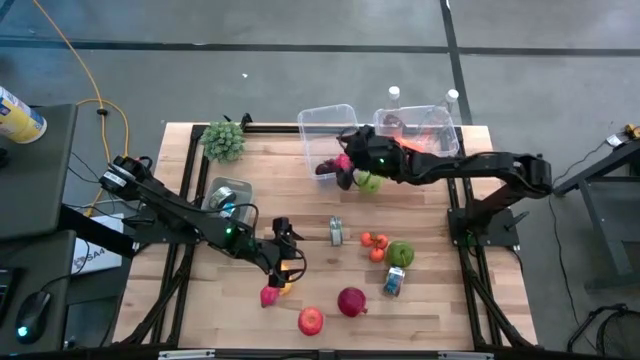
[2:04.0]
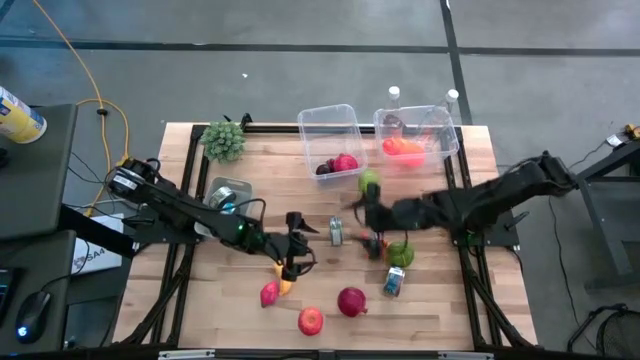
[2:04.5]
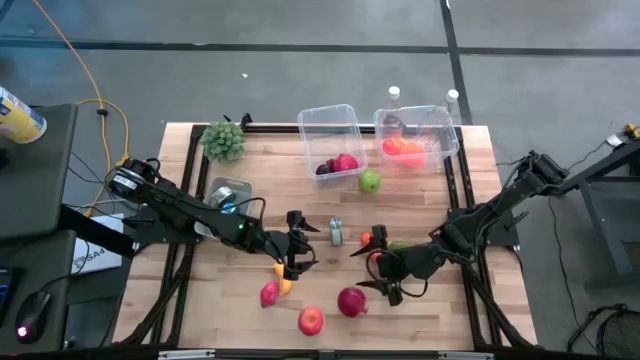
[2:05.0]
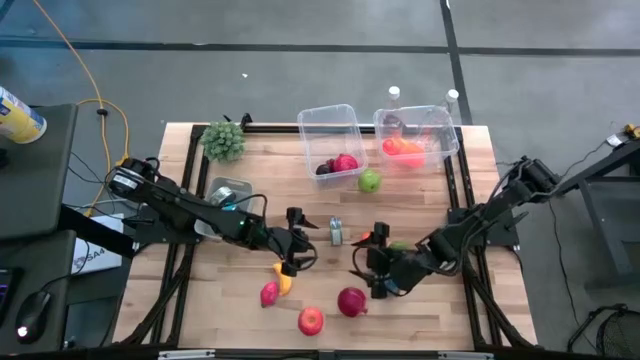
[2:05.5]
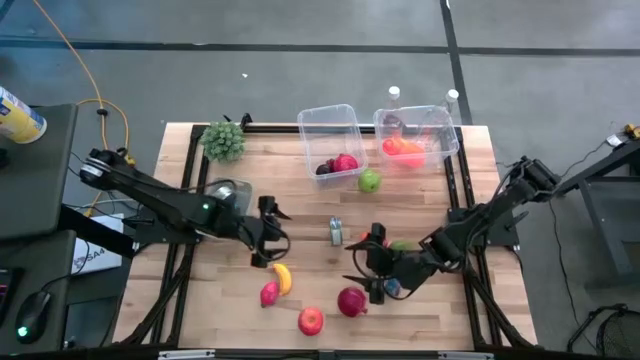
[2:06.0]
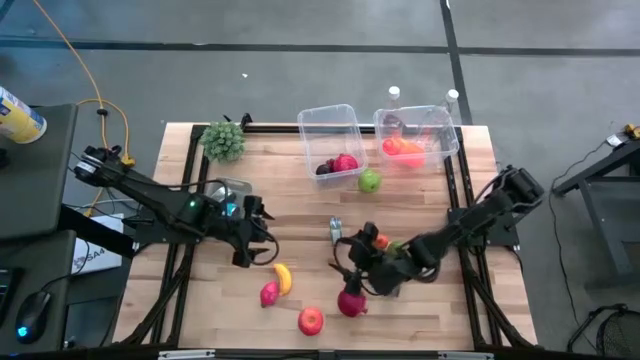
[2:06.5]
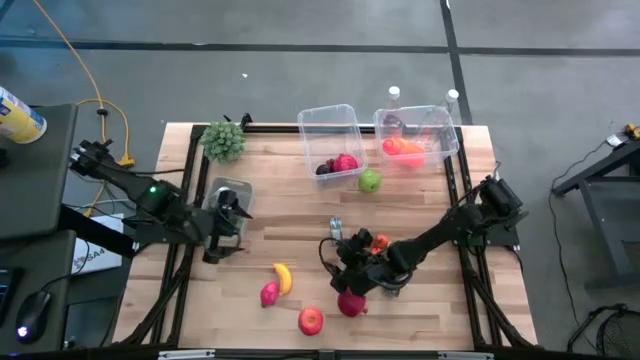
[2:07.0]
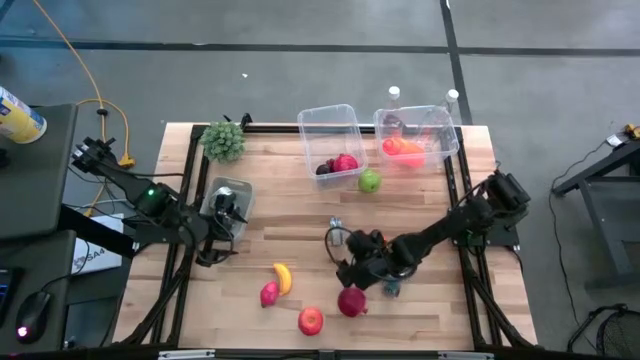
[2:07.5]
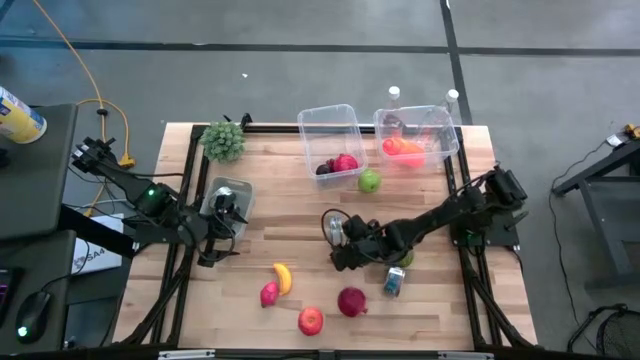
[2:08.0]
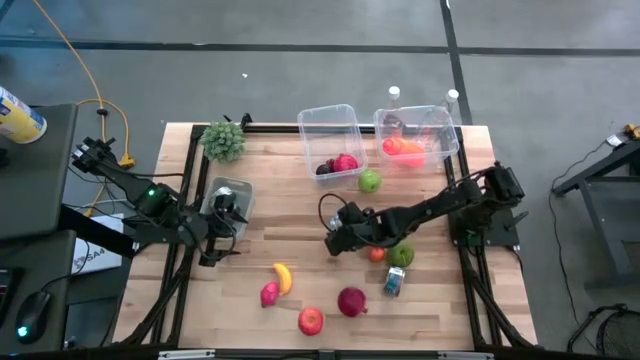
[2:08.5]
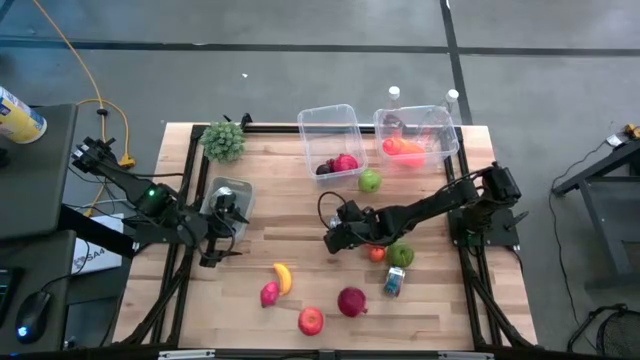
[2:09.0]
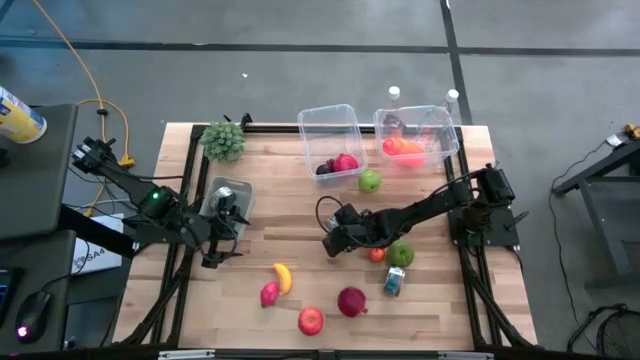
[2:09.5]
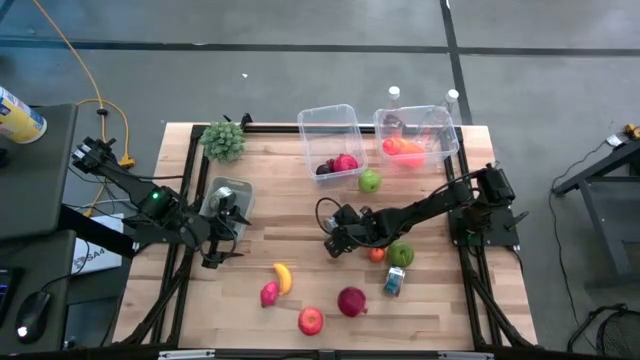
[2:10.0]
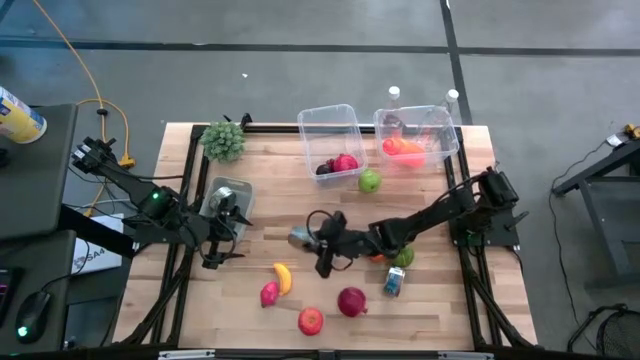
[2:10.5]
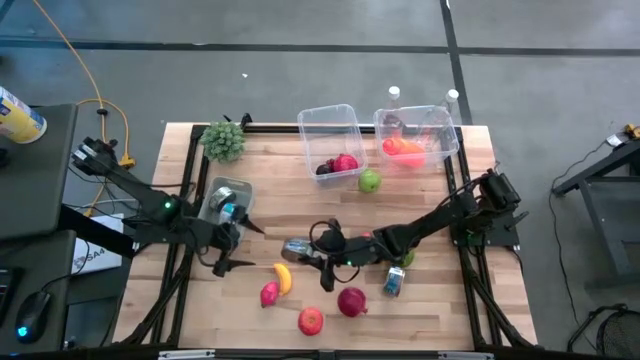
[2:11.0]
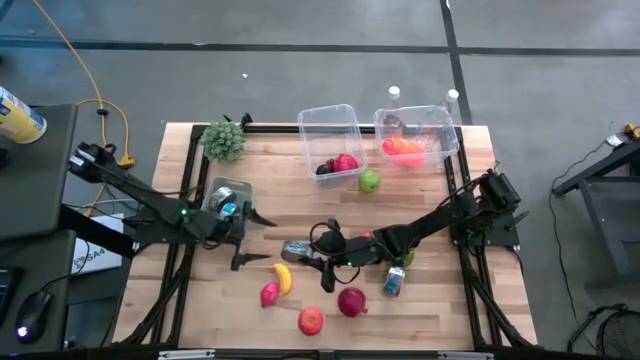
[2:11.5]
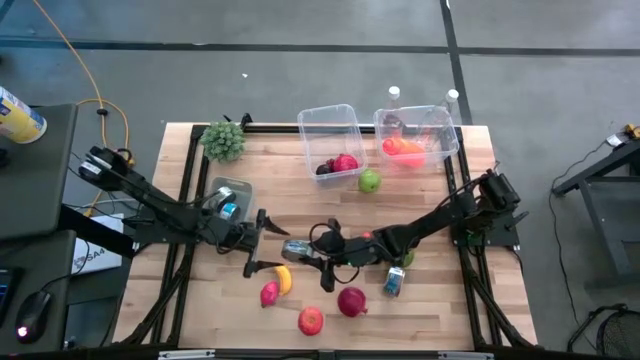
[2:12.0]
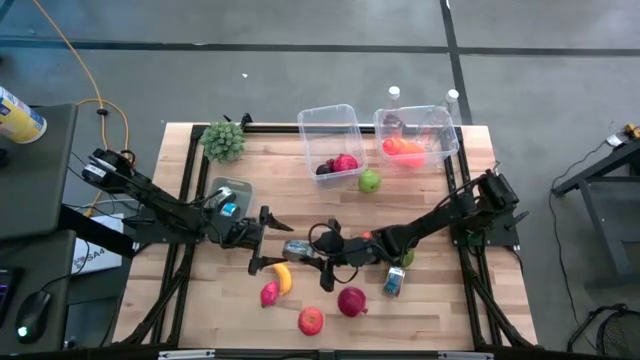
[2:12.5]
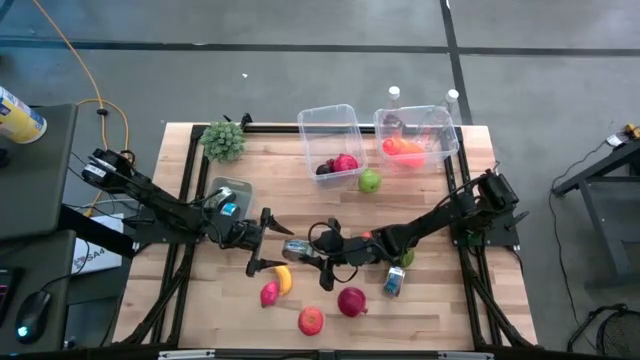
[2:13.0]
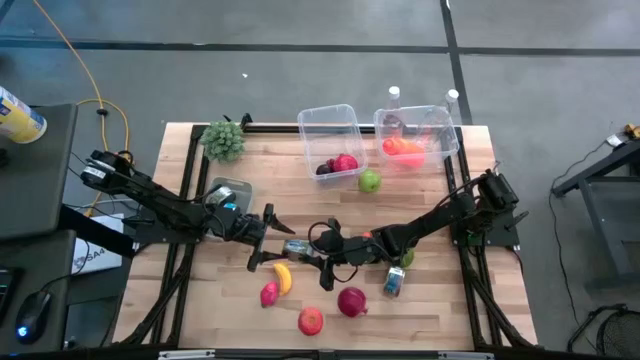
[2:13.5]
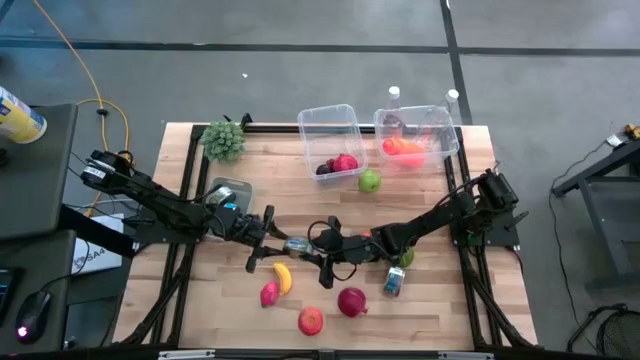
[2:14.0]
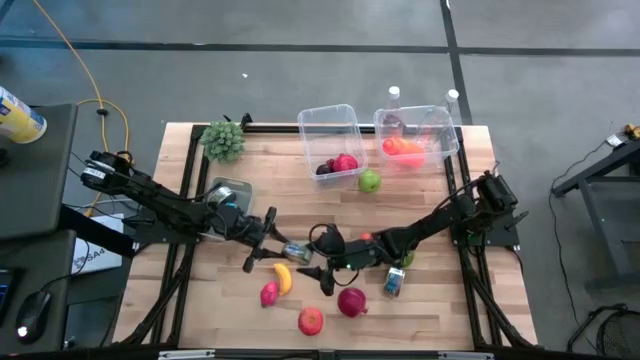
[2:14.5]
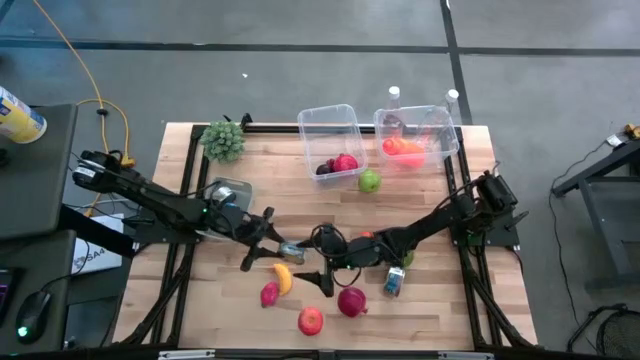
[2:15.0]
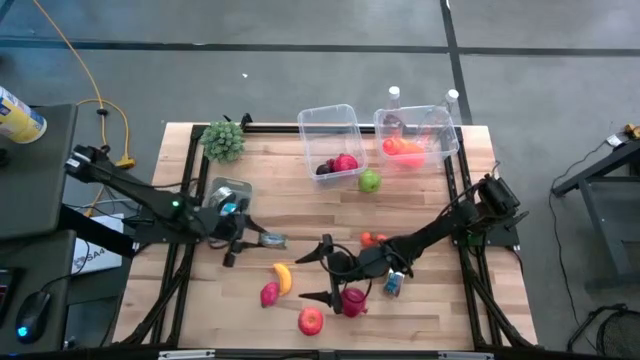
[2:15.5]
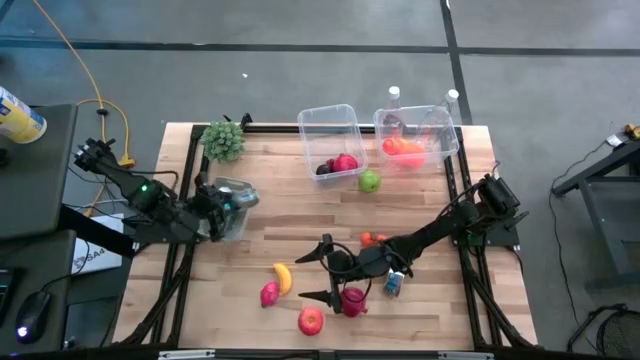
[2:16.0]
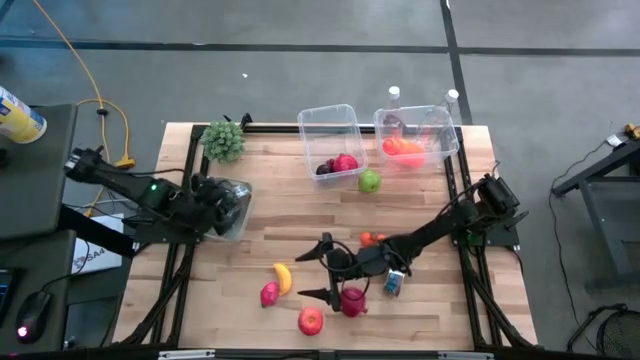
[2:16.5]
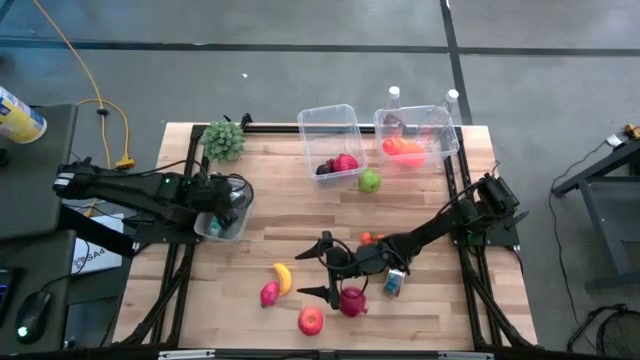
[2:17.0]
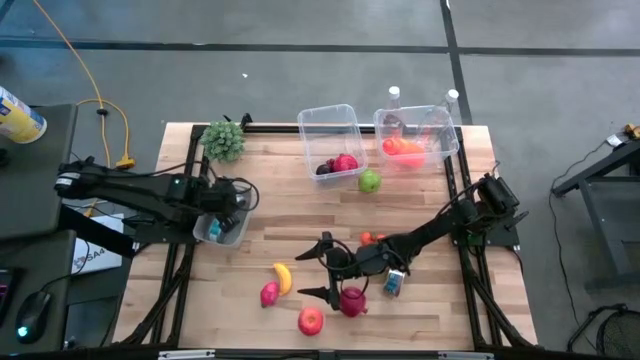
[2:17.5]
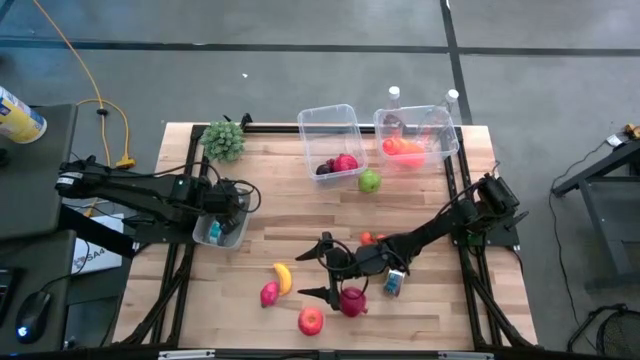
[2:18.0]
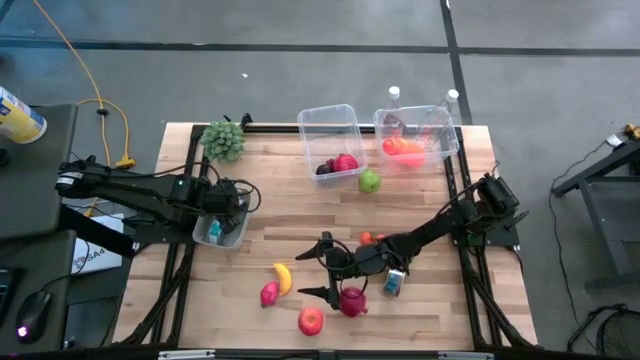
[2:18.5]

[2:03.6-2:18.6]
Task: Pick & Place Food Item
Put the green tuna can into the gray bin

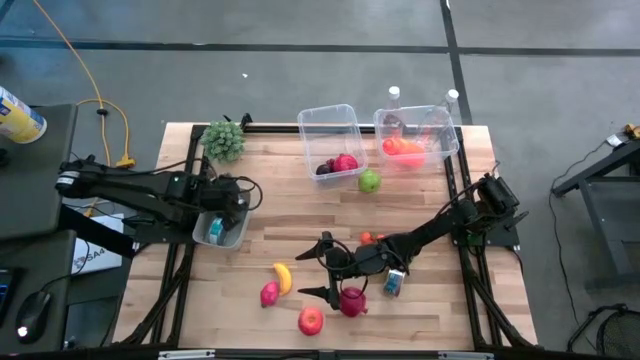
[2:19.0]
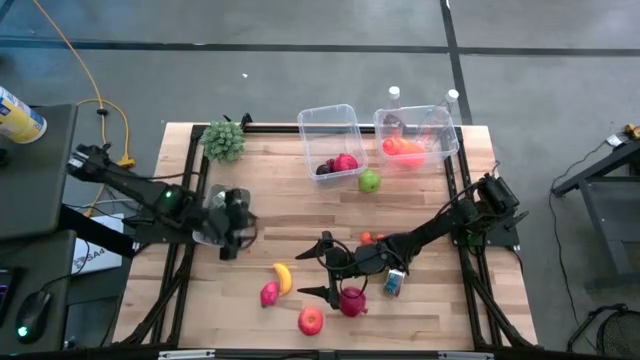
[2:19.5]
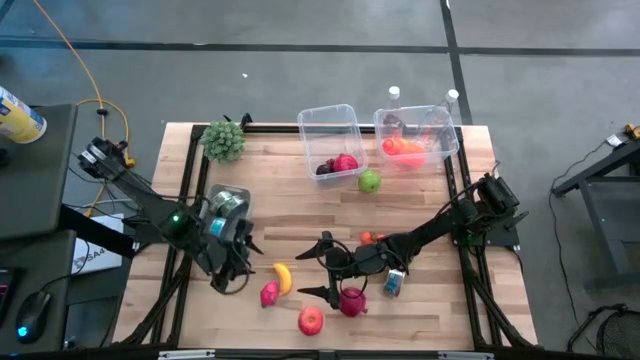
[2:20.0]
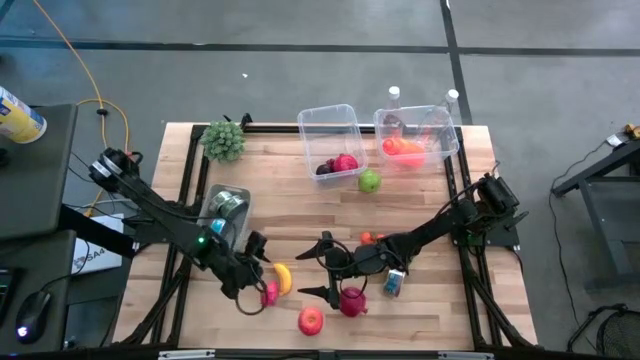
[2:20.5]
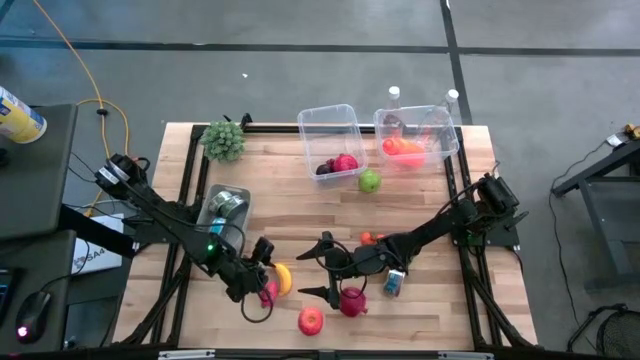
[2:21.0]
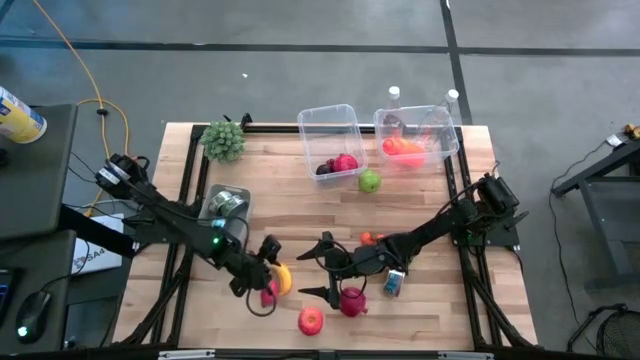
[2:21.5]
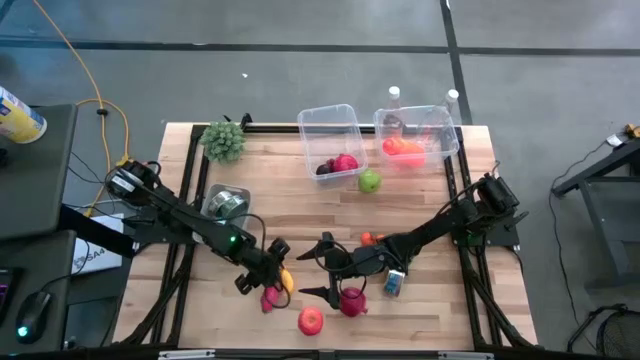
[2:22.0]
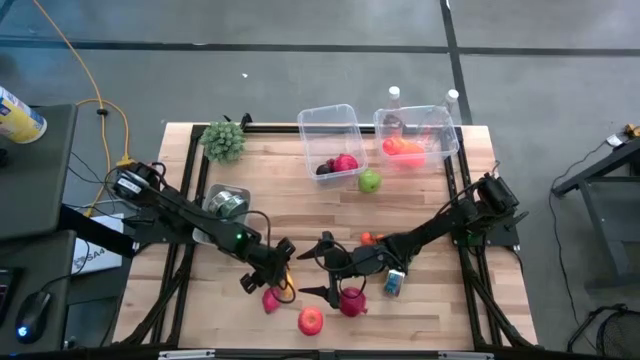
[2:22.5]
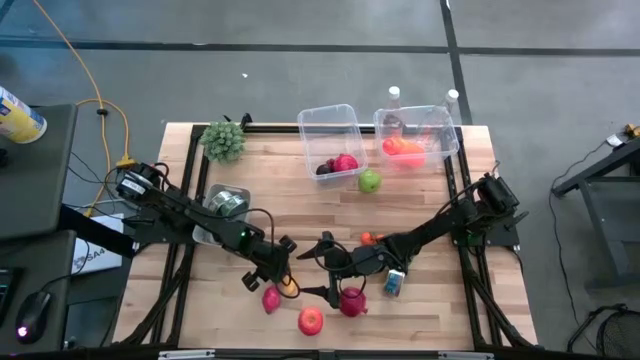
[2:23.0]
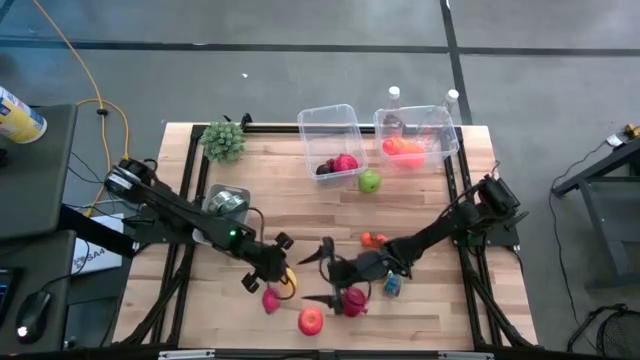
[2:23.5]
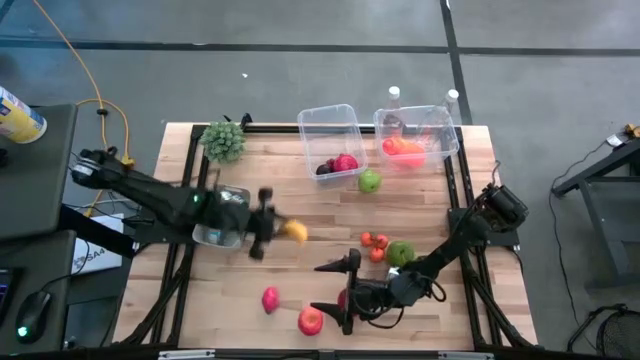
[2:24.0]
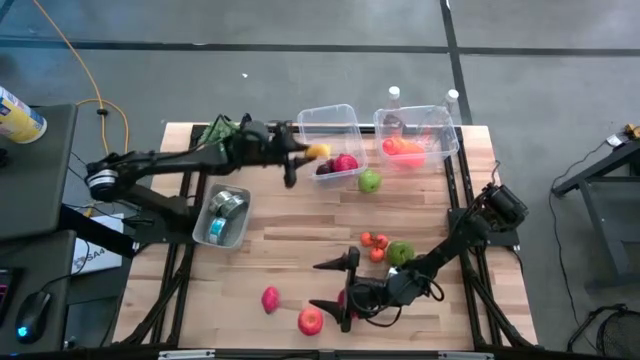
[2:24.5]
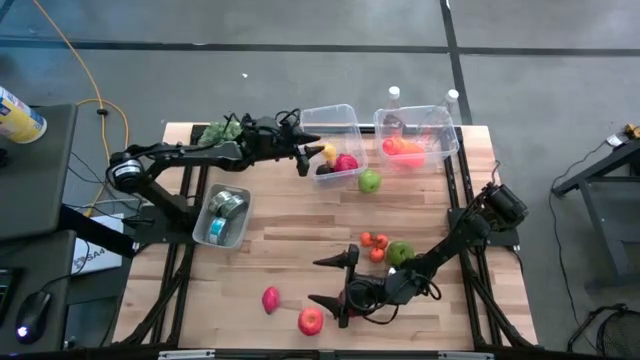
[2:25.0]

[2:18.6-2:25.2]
Put the banana into the left transparent bin
